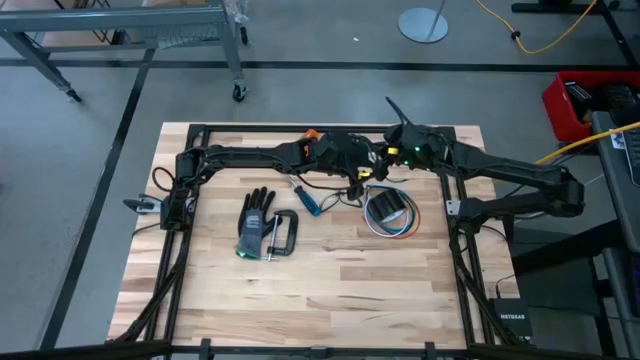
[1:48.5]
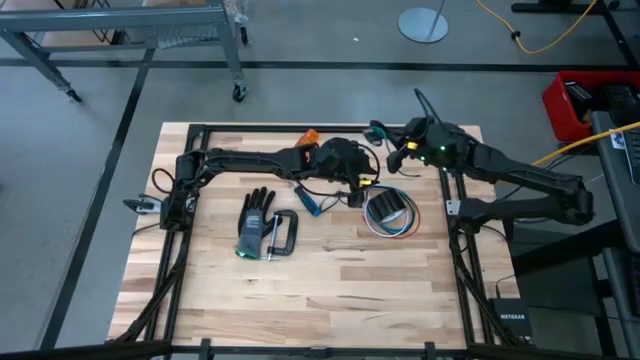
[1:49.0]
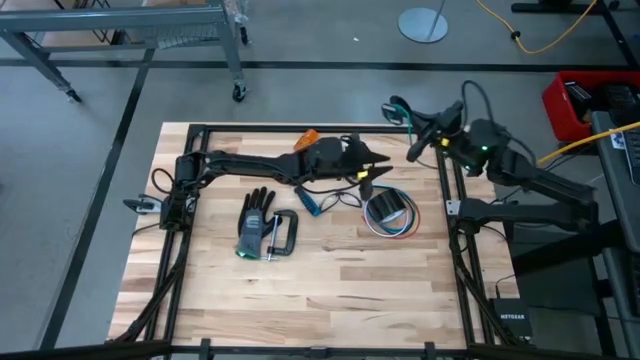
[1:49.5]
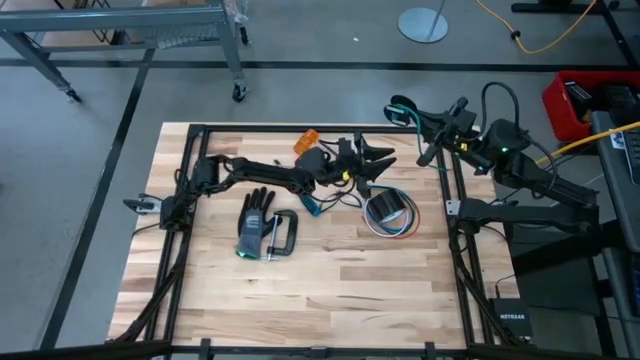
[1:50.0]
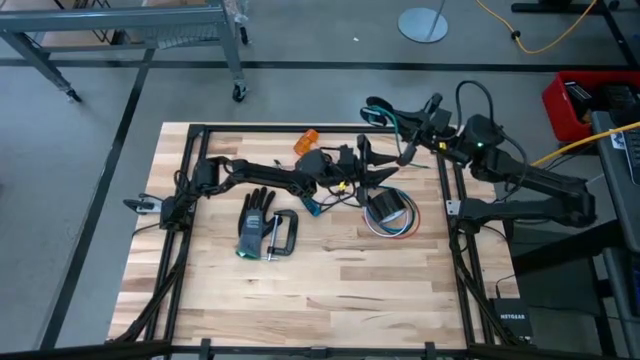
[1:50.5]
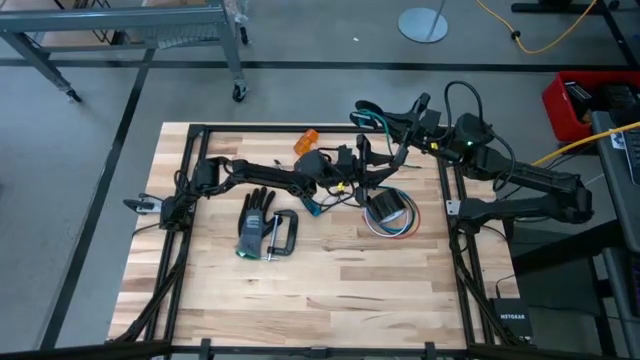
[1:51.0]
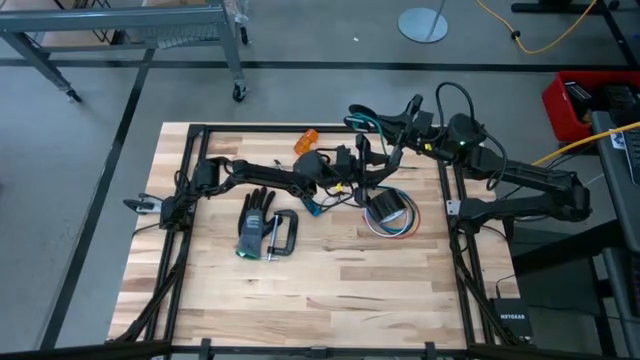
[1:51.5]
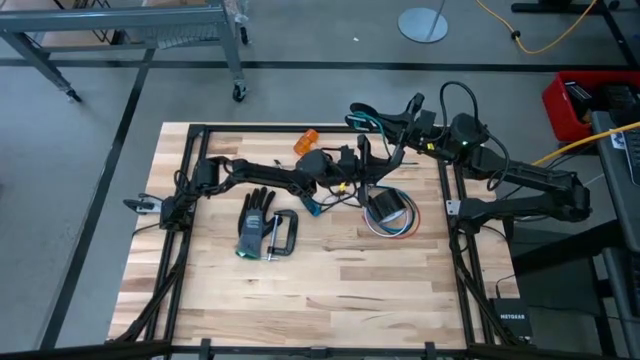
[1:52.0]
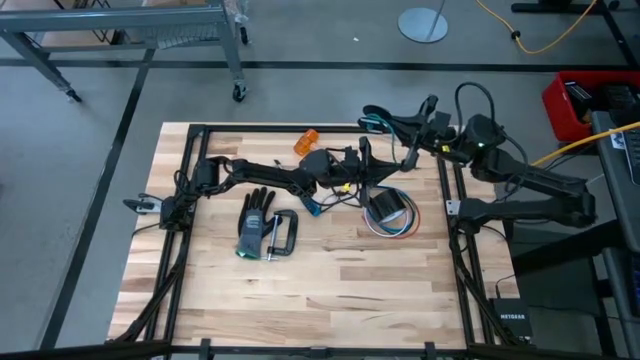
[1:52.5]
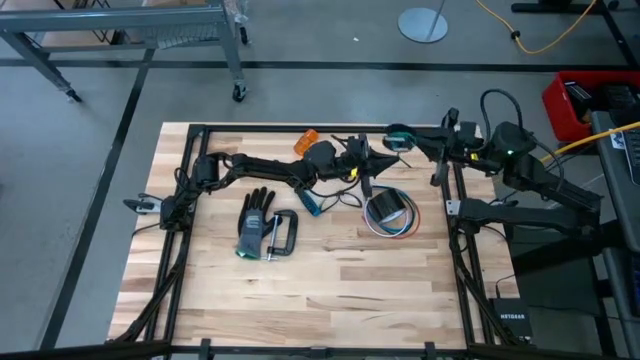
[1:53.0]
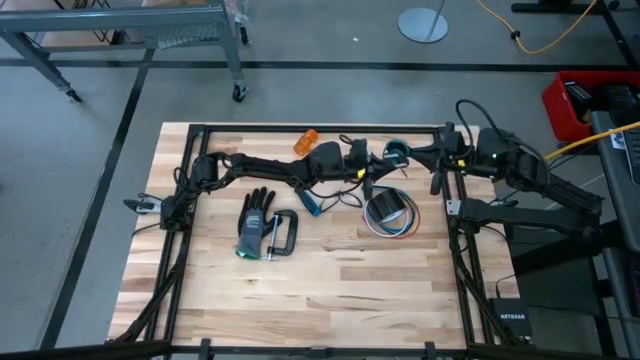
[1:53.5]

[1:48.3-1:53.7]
Task: Coil cords
Coil the green wire onto the spool

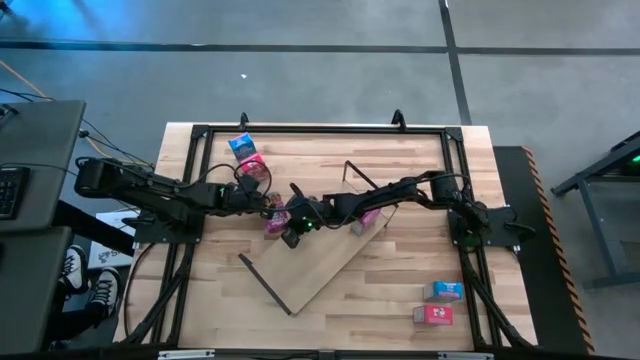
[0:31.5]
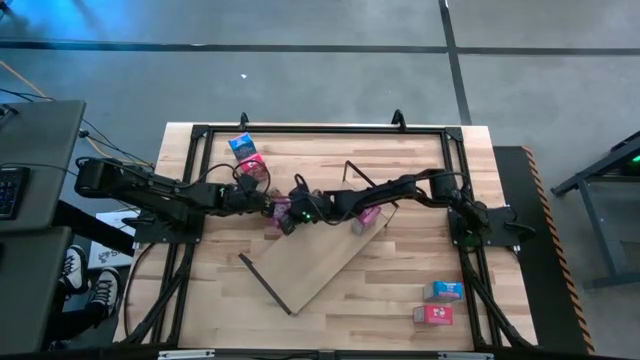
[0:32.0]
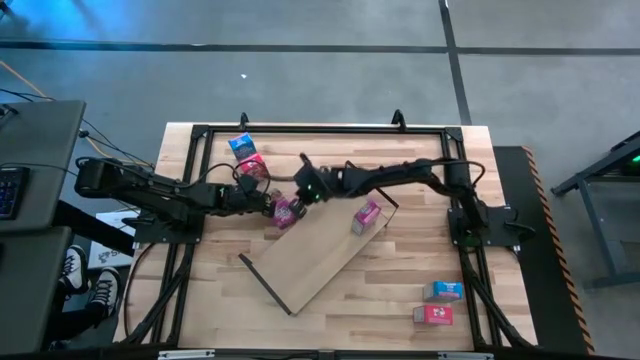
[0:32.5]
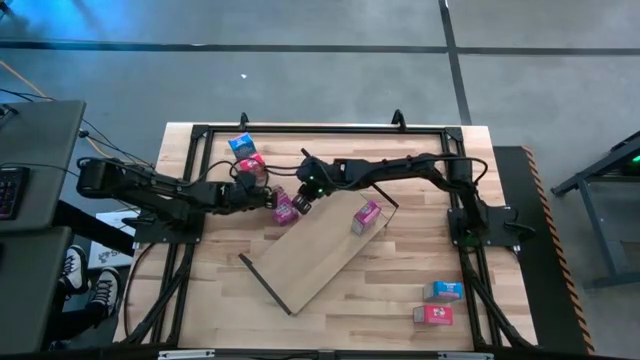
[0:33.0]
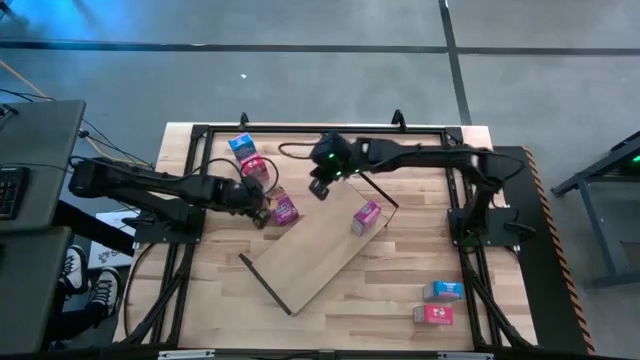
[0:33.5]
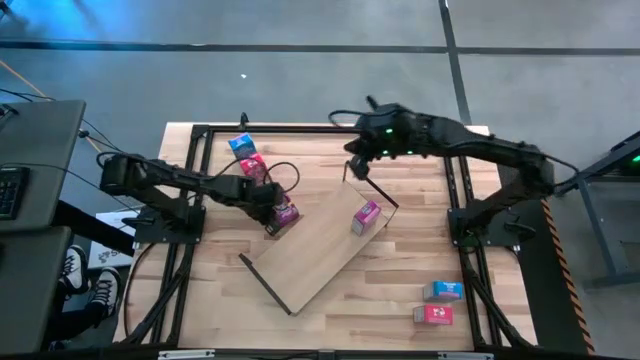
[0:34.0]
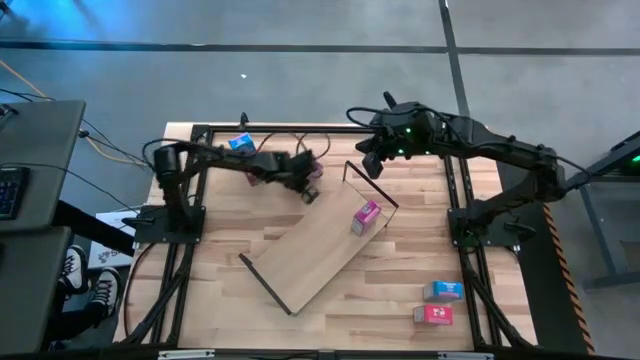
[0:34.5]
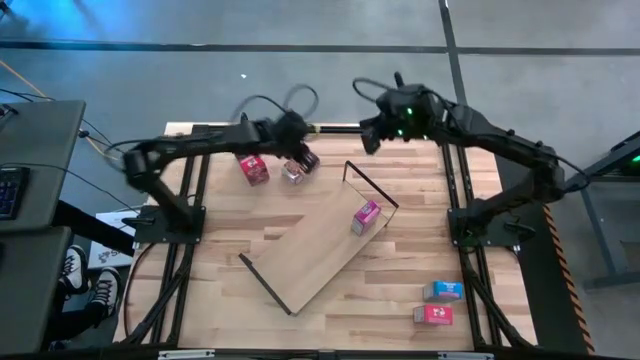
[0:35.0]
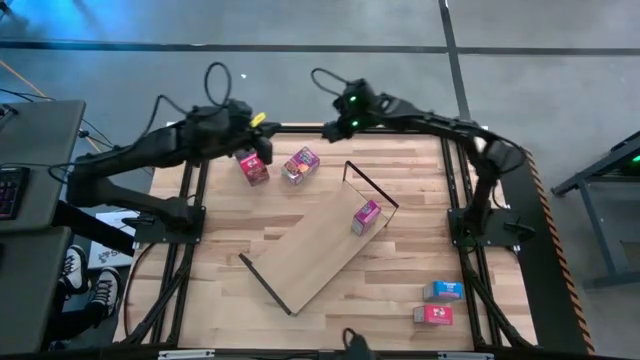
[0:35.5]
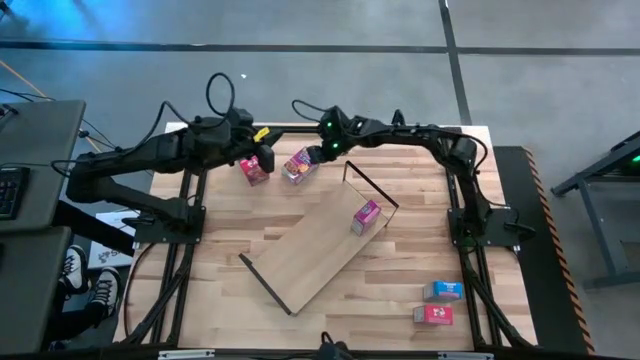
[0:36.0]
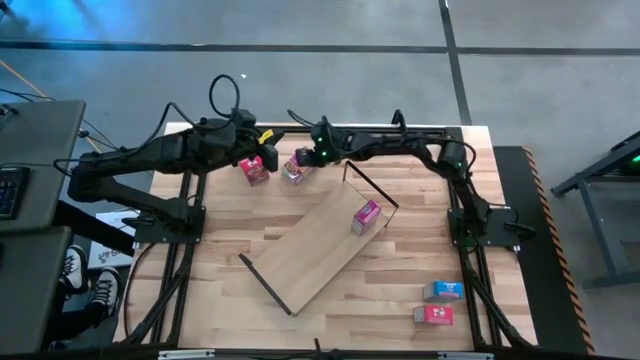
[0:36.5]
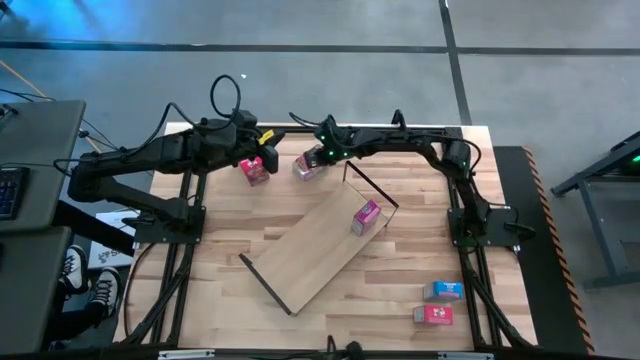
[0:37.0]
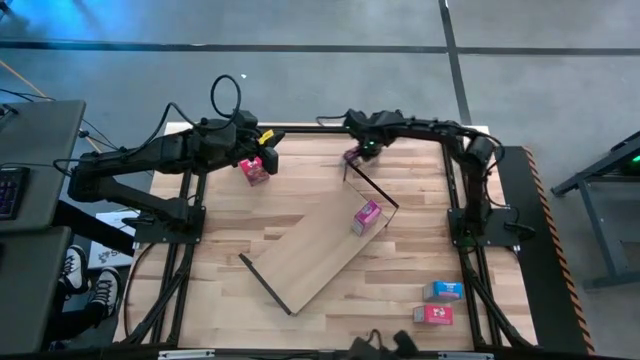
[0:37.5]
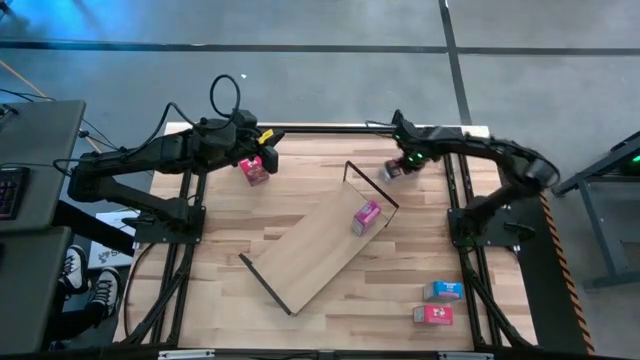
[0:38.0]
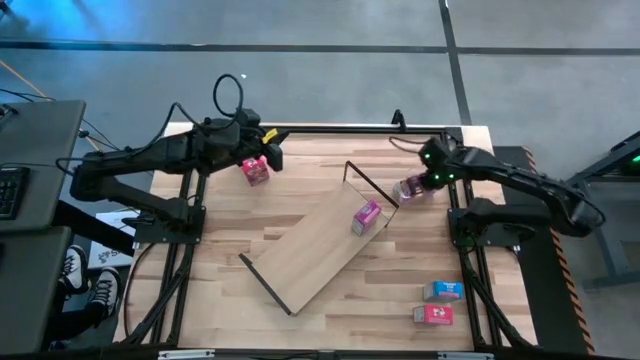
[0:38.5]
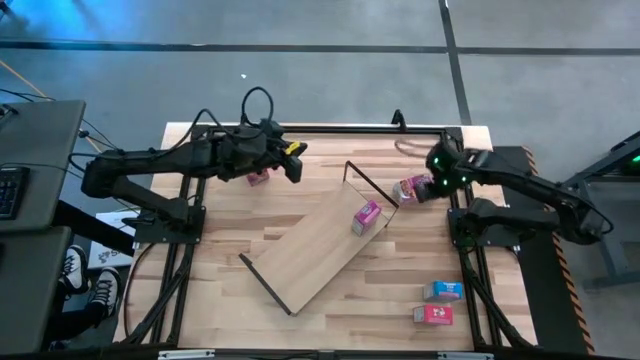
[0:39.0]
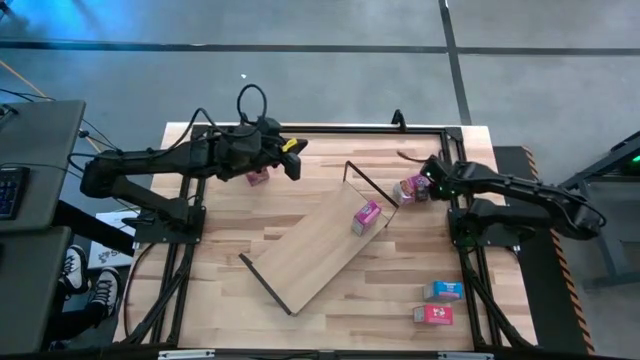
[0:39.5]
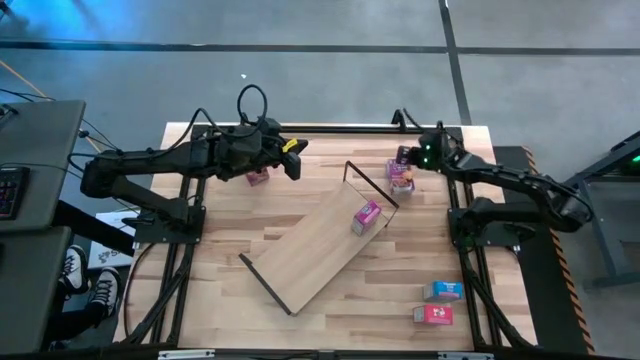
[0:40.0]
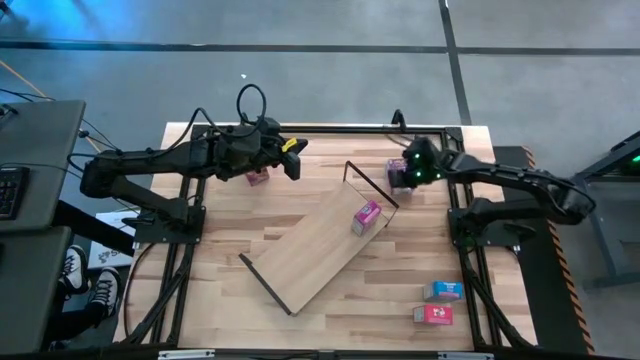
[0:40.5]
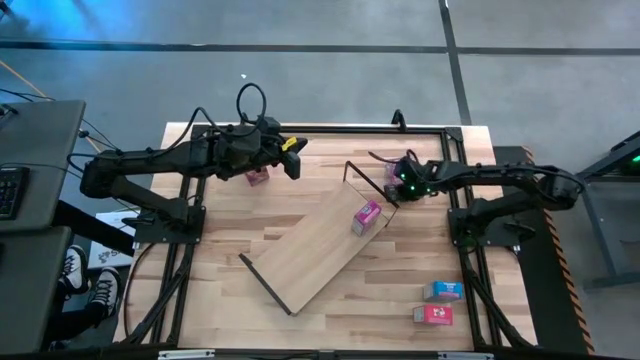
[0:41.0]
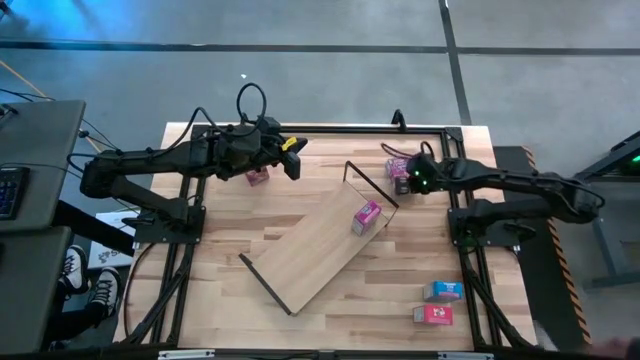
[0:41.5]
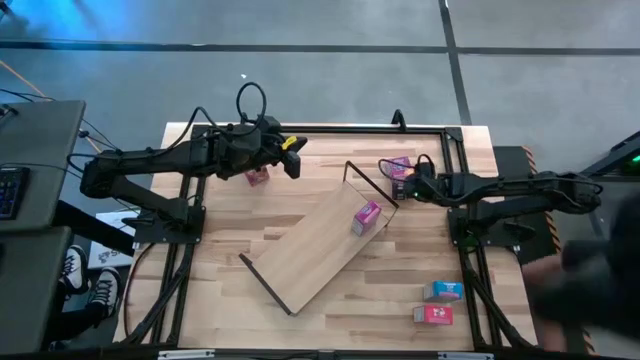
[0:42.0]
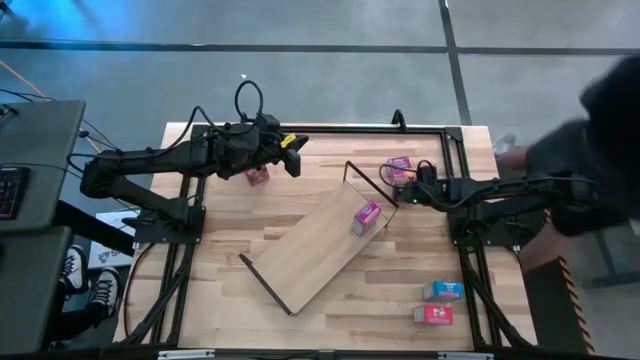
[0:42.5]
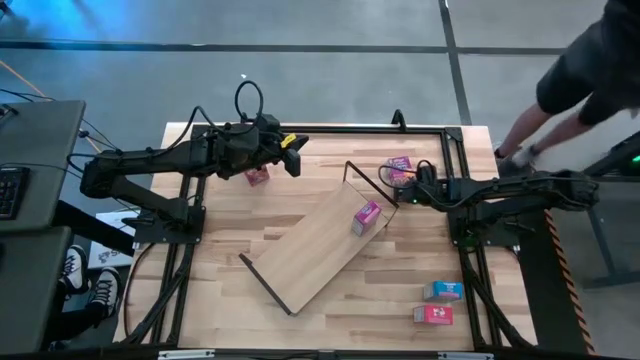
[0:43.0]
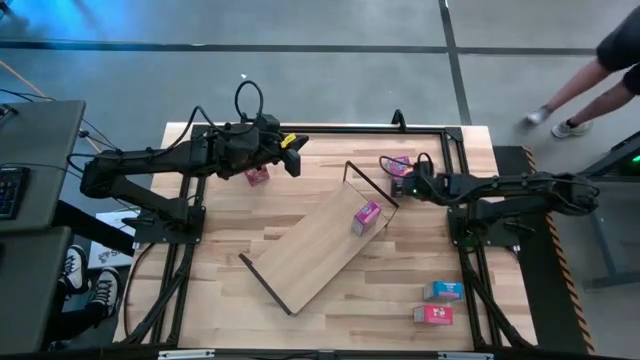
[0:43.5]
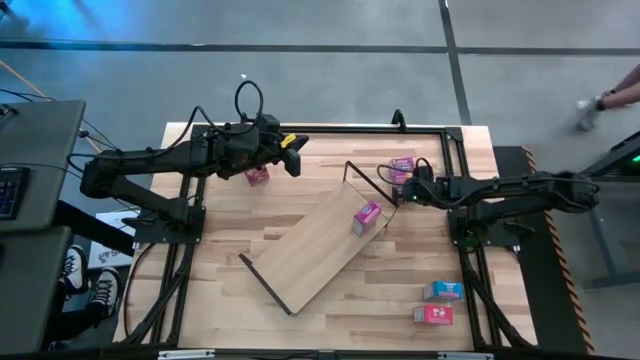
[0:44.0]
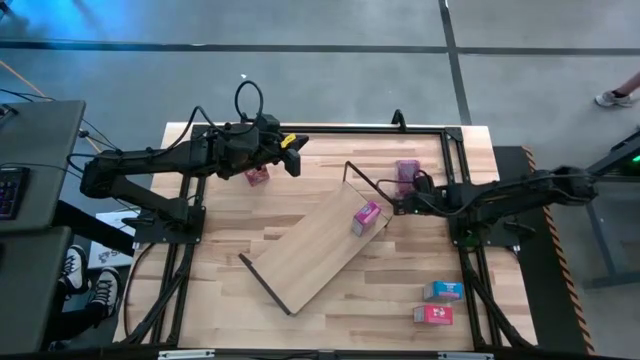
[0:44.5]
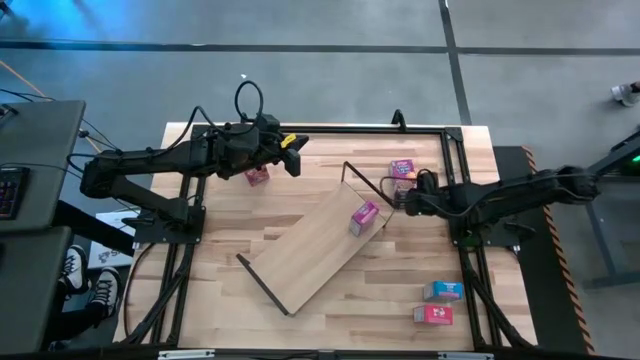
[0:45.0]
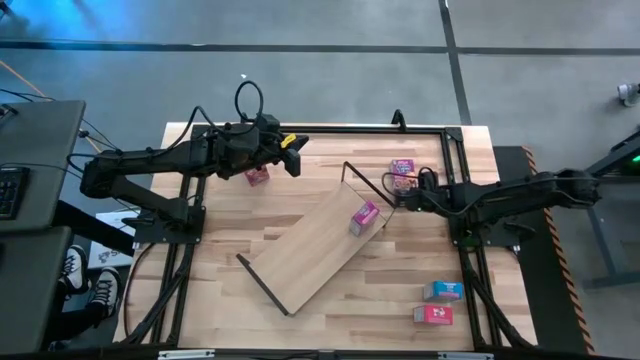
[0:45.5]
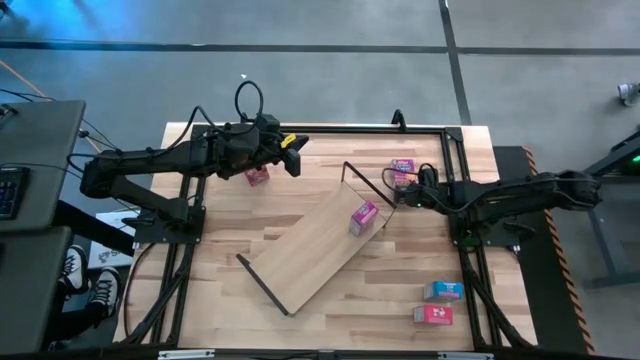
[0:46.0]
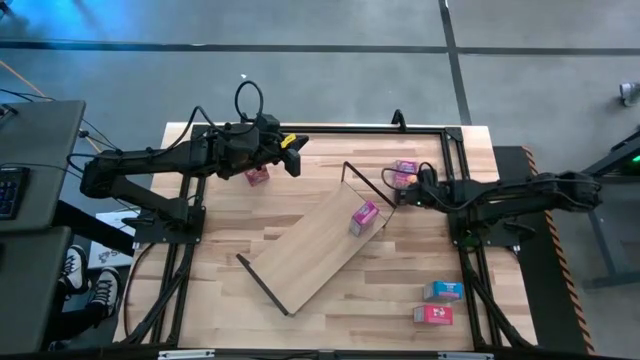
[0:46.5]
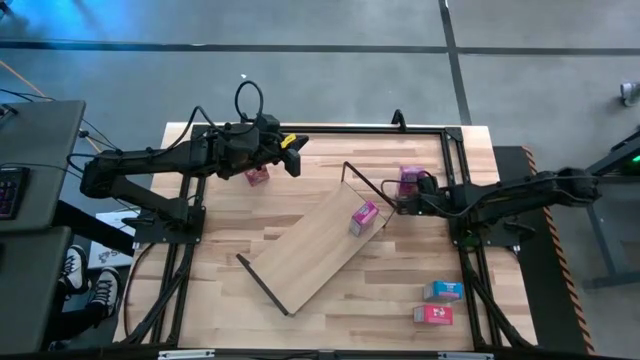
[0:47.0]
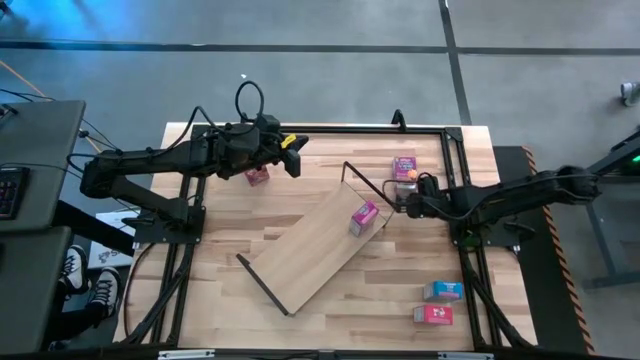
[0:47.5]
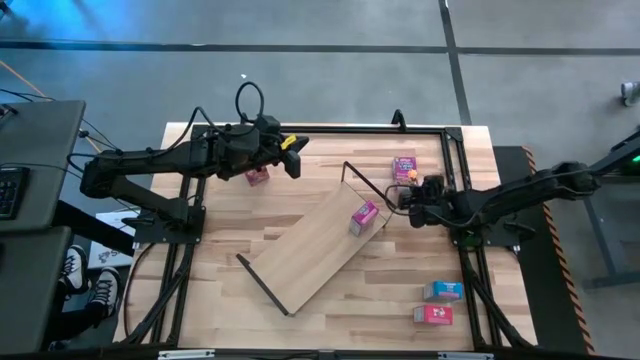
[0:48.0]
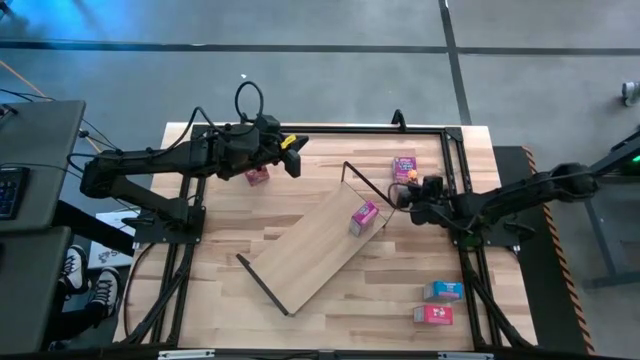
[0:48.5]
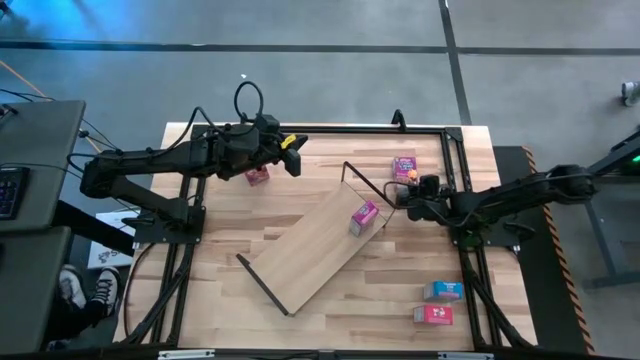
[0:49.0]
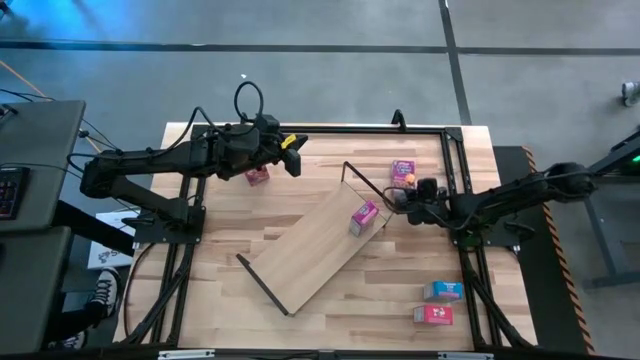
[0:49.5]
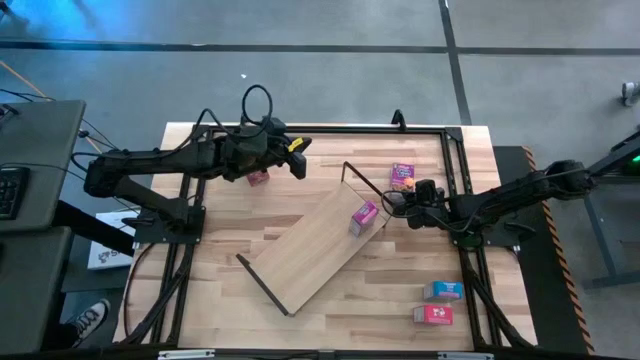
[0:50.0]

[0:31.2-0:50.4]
Task: Stack cereal on shelf
Put the purple cereal box on the shelf aligned with the other purple cereal box
